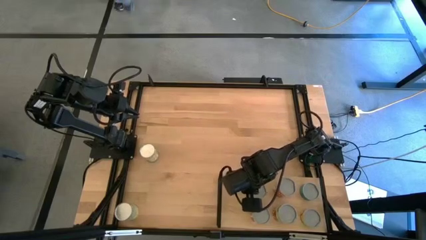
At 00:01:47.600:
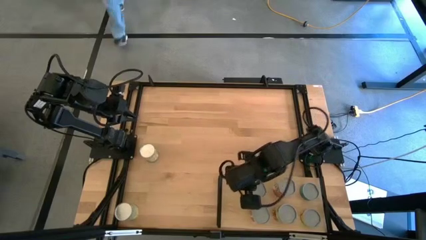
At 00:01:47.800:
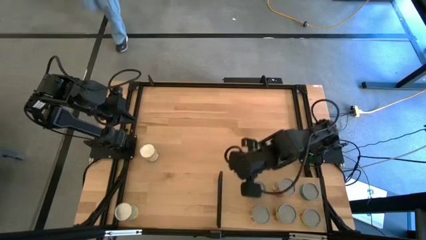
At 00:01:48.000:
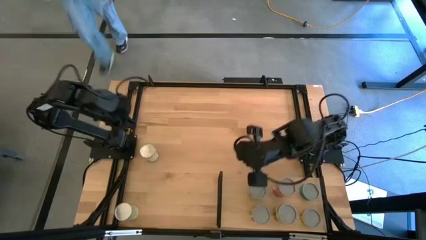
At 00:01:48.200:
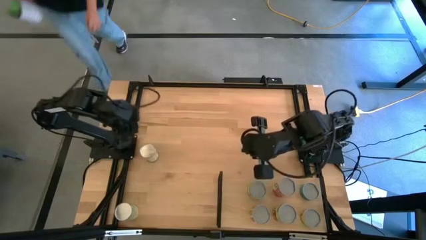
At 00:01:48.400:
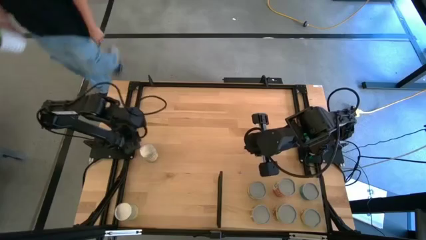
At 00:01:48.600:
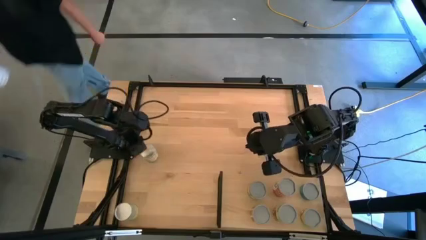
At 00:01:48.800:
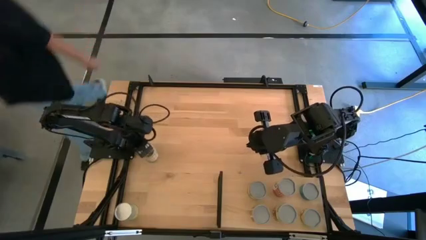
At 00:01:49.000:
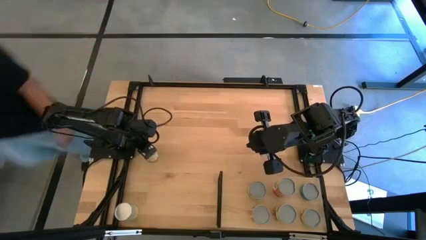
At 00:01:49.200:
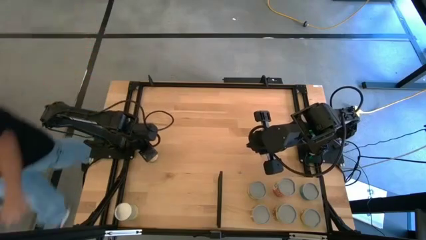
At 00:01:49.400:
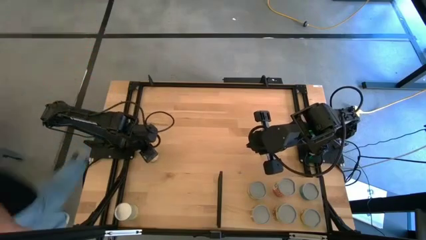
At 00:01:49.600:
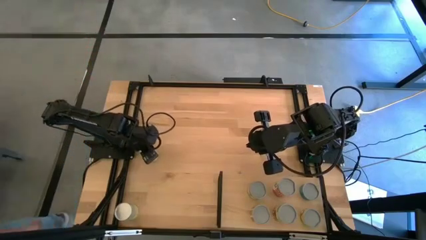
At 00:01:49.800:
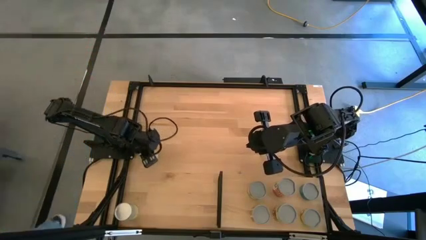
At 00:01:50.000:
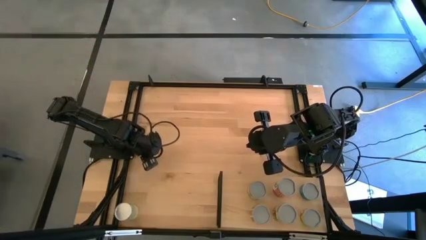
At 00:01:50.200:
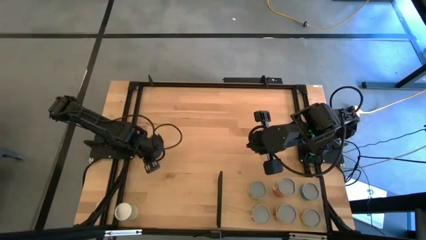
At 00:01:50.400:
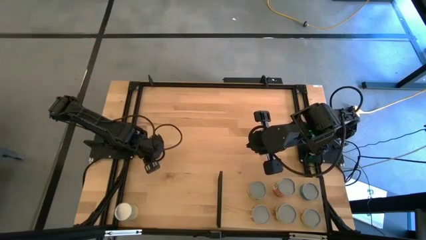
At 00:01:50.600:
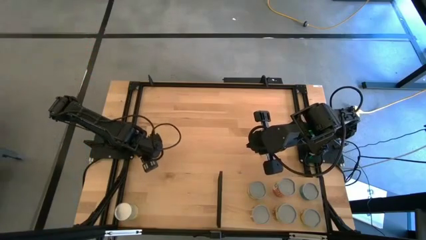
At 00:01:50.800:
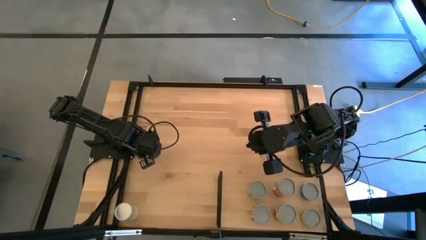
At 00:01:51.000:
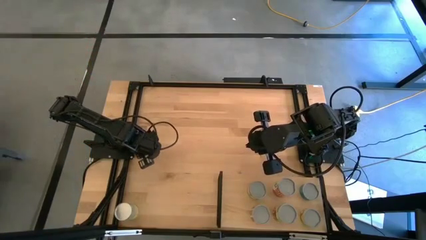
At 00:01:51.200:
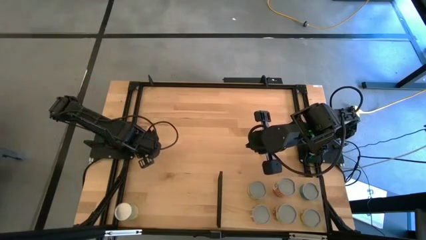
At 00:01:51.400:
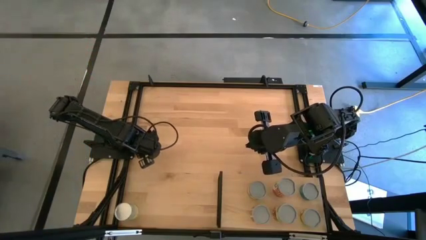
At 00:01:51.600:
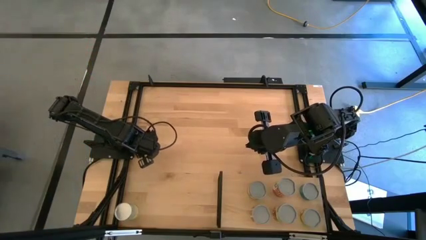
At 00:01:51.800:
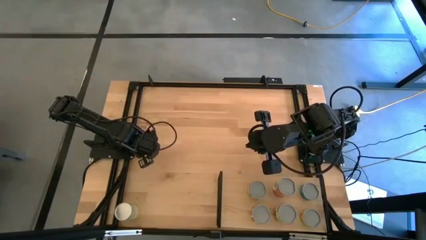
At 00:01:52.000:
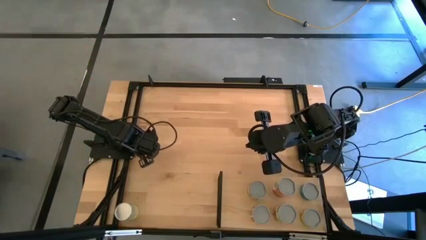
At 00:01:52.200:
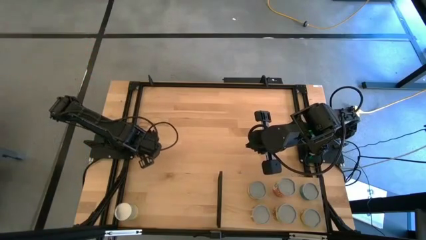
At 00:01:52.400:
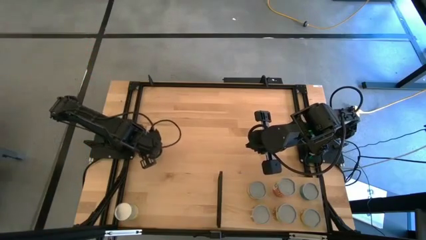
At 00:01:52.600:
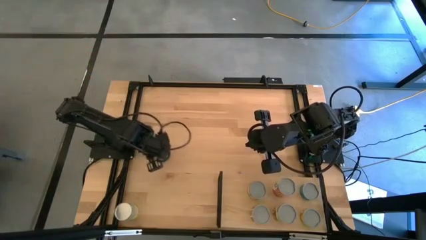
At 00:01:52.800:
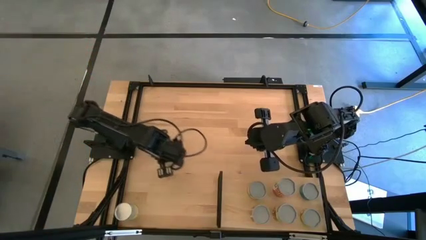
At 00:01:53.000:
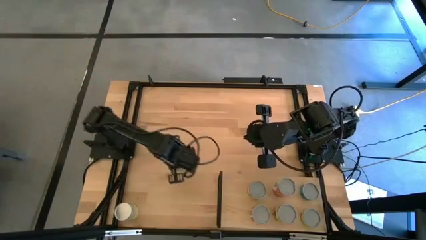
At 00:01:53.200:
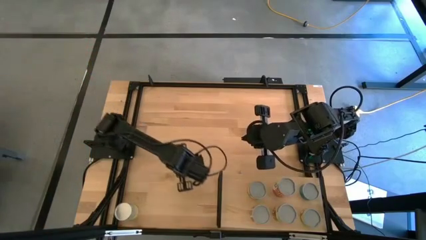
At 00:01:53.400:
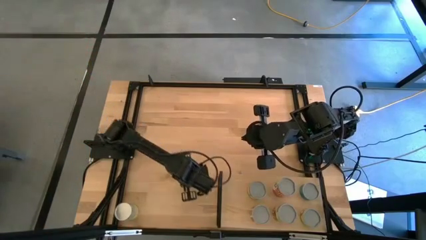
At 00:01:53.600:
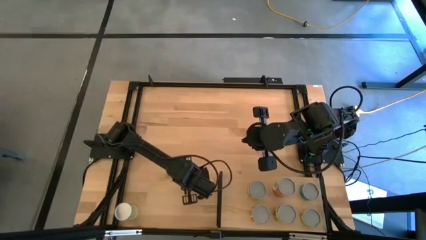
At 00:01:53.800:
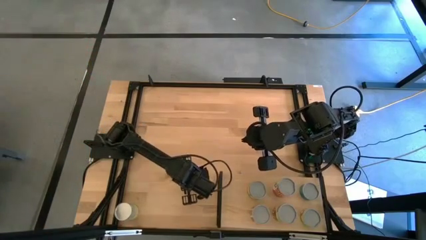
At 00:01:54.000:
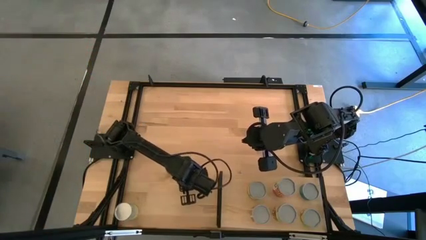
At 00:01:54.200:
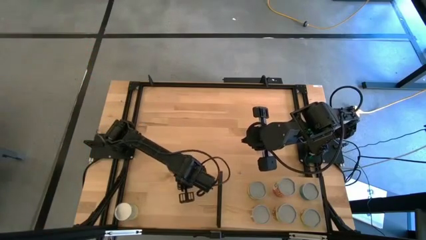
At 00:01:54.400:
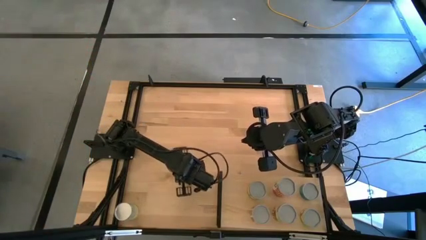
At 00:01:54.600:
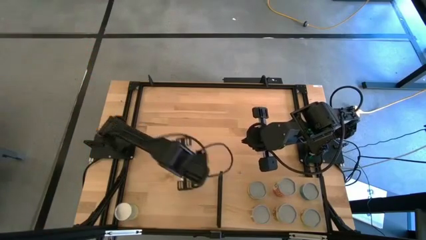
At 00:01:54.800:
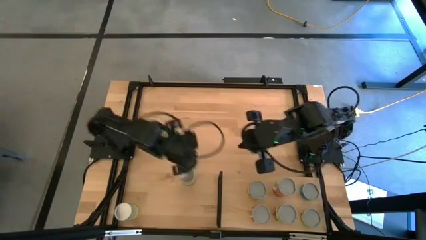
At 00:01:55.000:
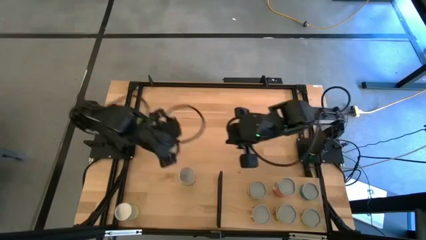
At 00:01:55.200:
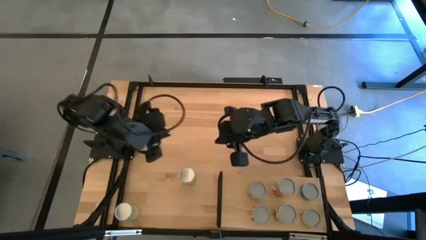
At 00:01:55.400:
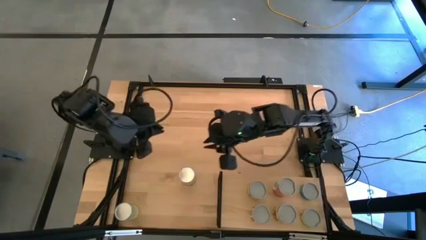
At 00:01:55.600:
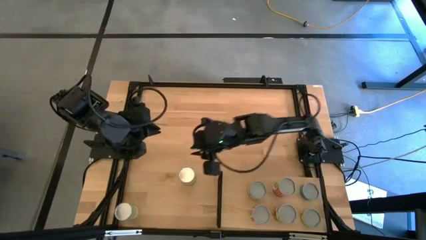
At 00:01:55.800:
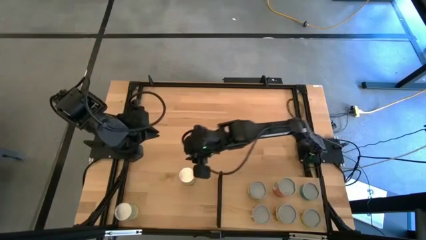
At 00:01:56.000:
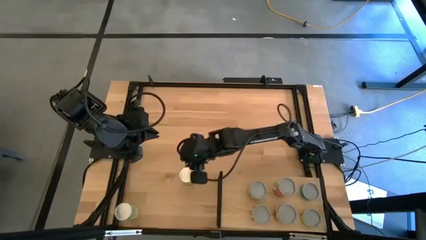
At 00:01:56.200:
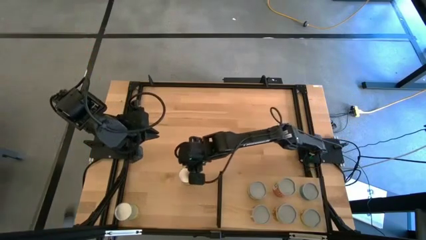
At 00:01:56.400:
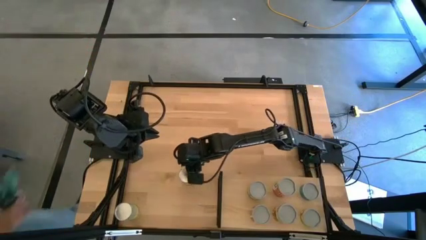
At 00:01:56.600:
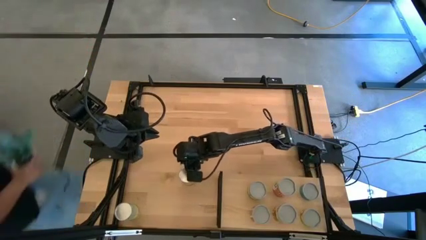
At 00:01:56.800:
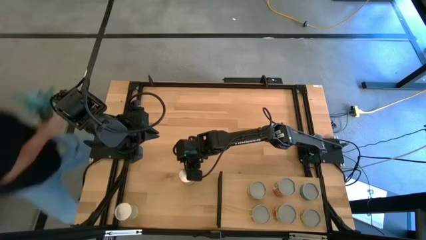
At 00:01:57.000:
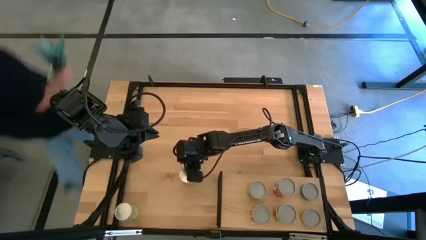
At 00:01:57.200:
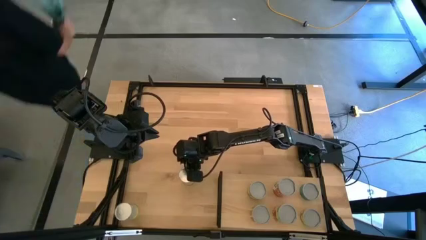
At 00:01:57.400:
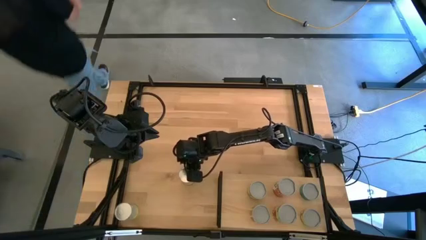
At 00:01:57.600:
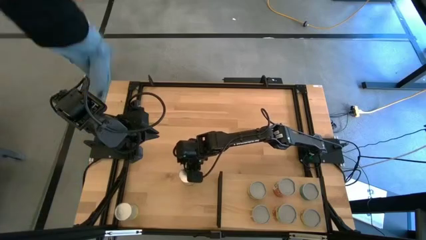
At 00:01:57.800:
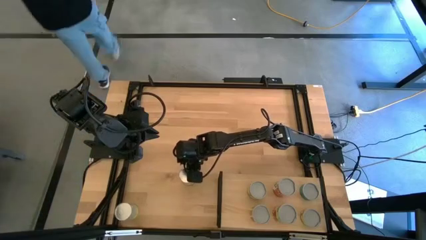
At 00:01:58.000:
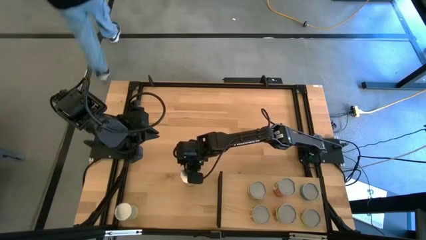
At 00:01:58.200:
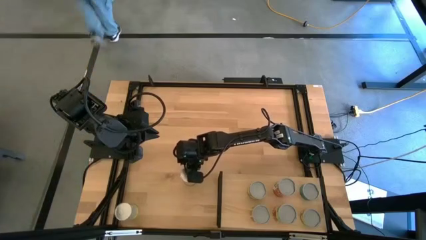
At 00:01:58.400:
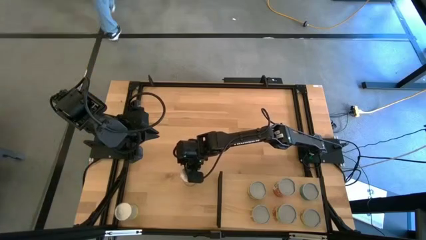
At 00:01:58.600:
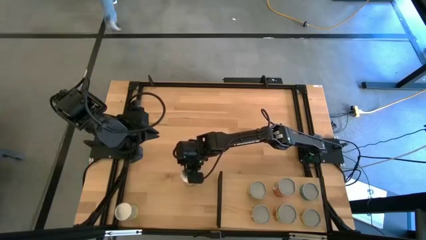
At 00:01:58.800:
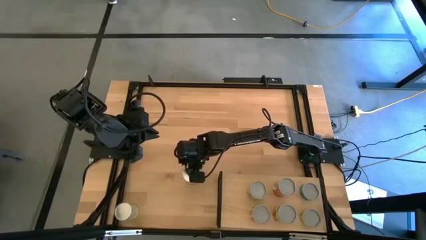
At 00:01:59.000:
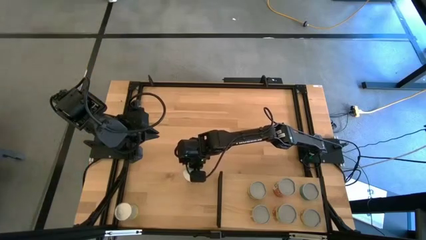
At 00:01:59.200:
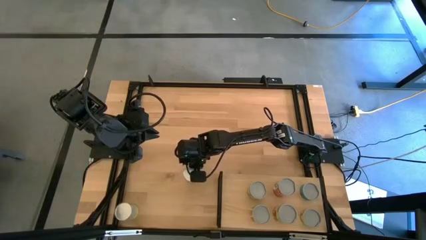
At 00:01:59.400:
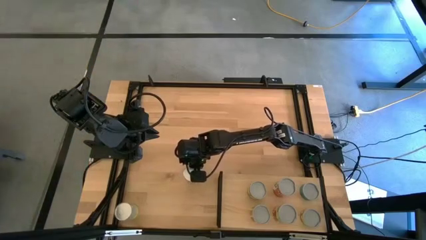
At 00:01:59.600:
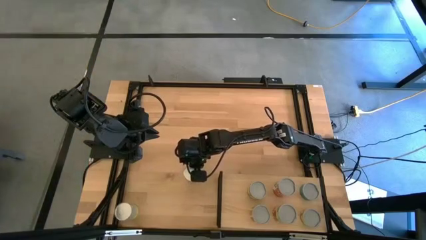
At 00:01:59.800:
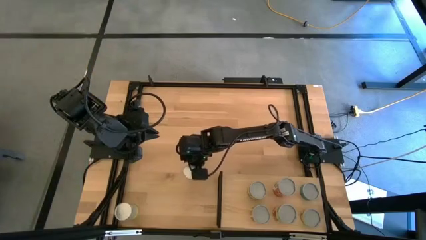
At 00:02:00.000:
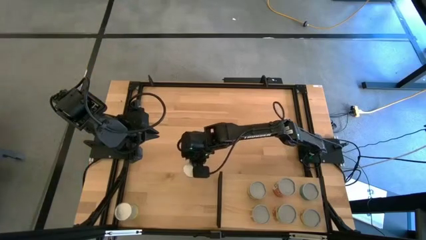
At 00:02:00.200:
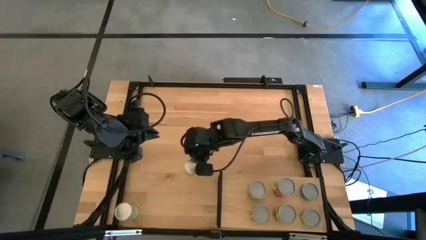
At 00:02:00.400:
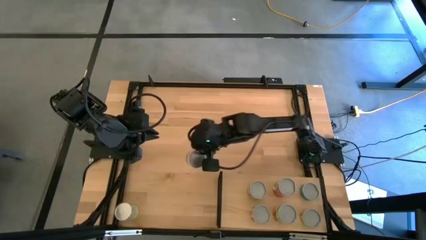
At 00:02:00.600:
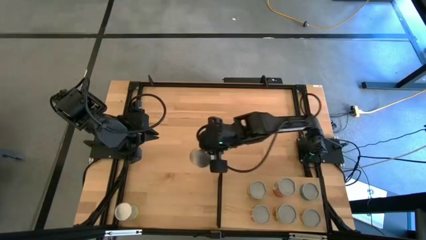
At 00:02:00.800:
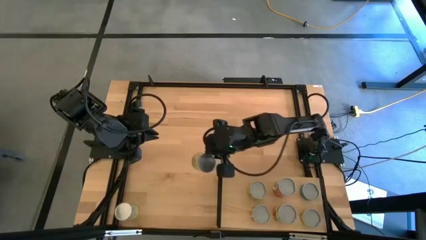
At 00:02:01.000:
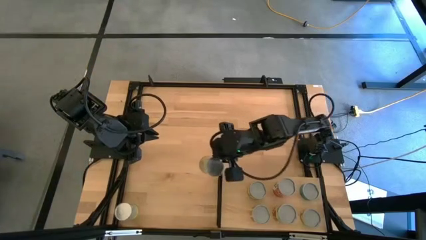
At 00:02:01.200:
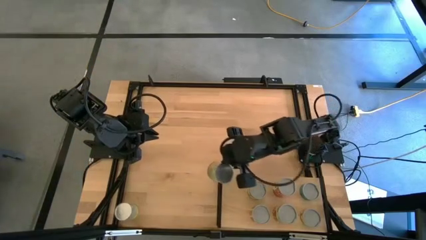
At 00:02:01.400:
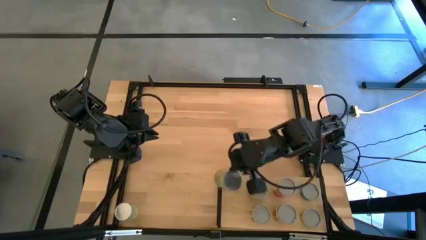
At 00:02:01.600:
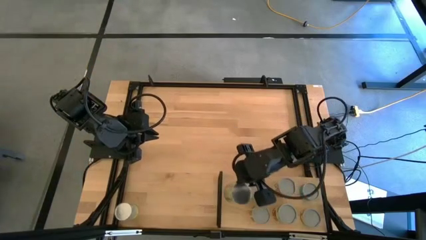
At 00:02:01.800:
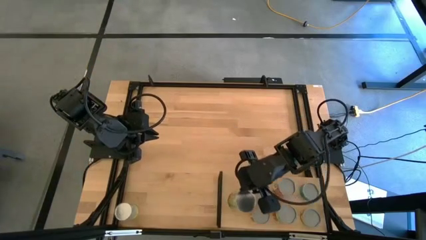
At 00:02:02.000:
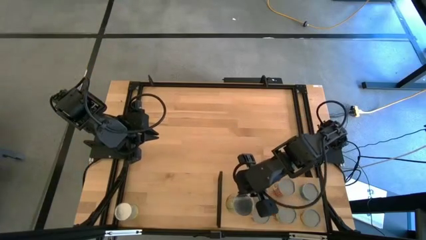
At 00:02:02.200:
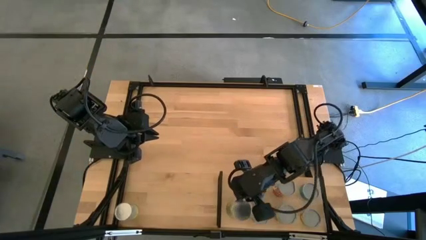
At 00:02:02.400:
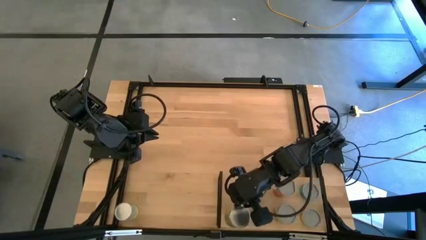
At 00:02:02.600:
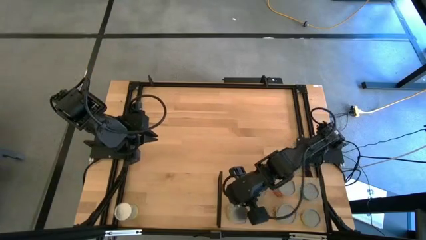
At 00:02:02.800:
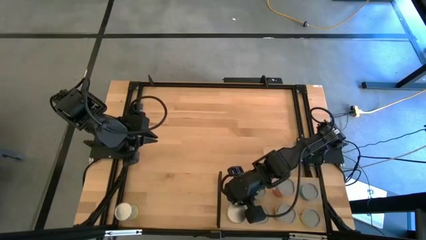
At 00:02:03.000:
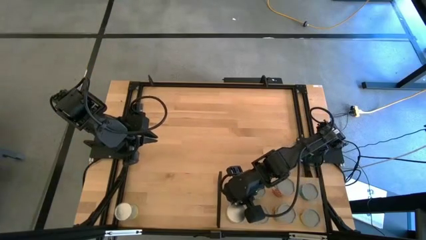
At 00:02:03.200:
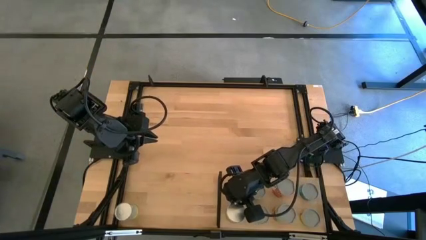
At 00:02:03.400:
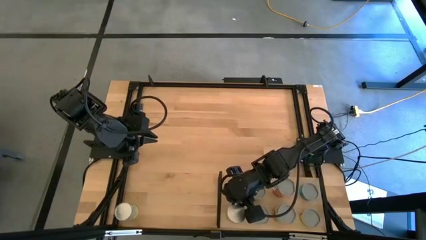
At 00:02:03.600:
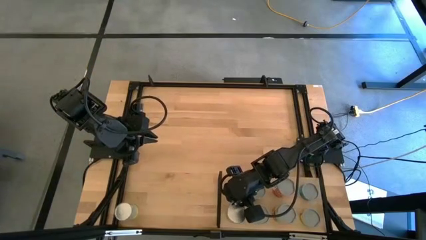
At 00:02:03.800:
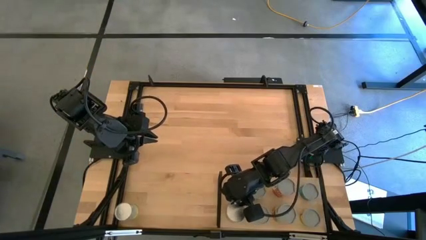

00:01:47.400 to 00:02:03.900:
Task: Pick and place cans onto a shelf
Put the canned oranges on the shelf
